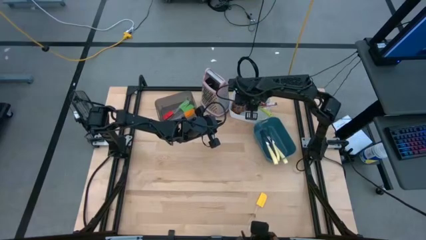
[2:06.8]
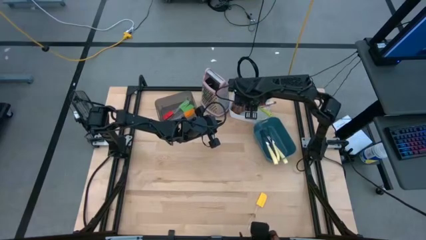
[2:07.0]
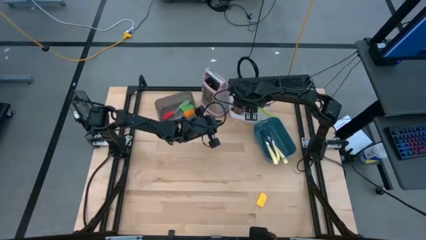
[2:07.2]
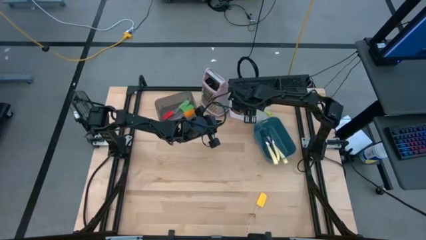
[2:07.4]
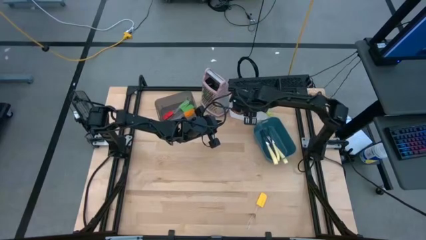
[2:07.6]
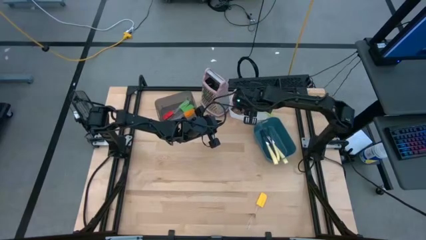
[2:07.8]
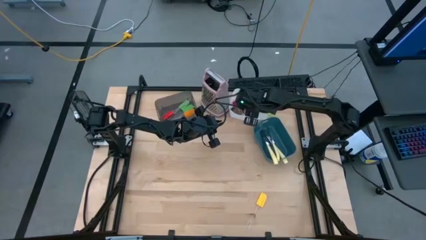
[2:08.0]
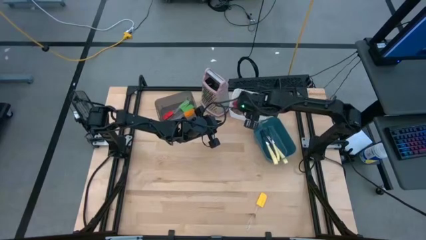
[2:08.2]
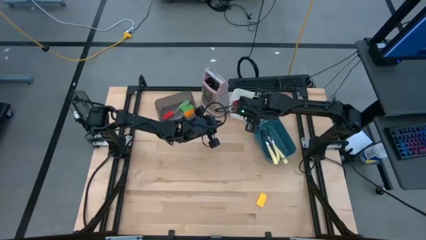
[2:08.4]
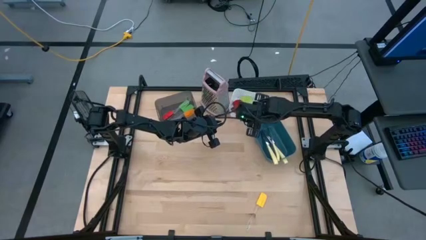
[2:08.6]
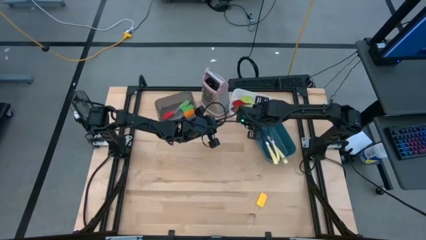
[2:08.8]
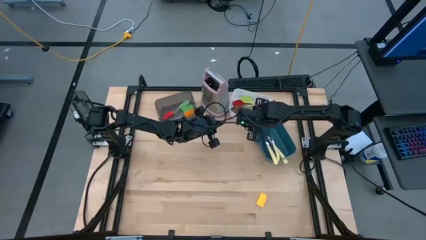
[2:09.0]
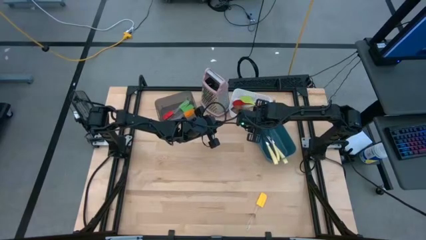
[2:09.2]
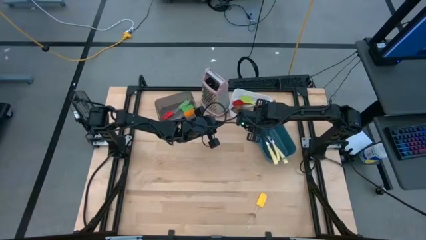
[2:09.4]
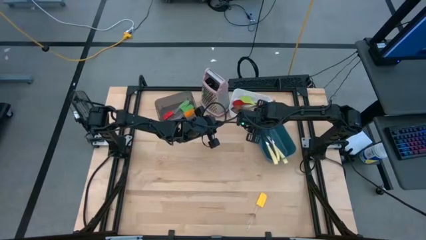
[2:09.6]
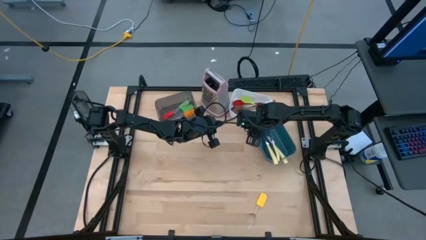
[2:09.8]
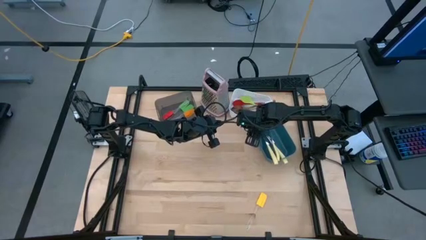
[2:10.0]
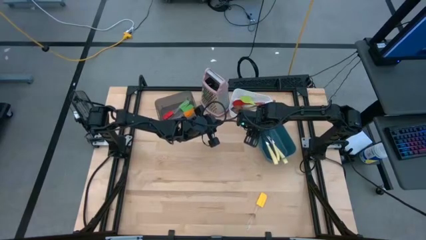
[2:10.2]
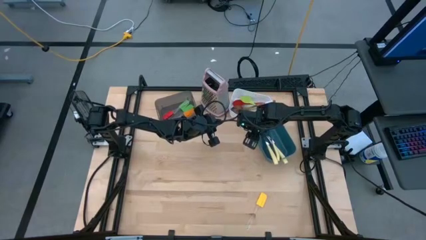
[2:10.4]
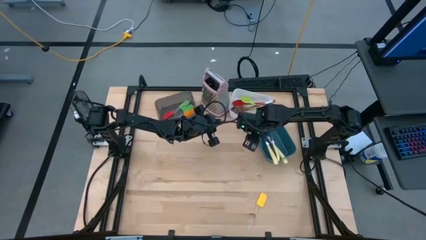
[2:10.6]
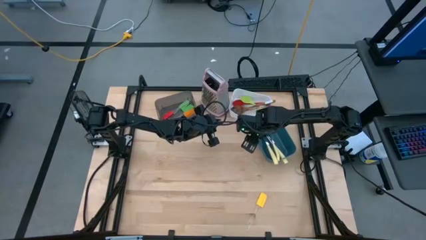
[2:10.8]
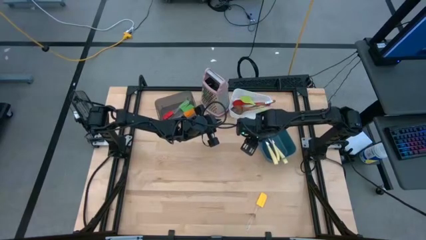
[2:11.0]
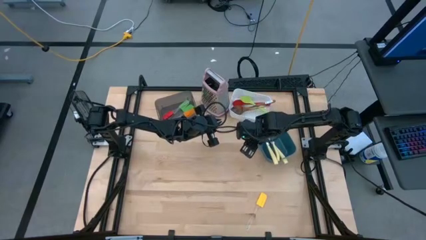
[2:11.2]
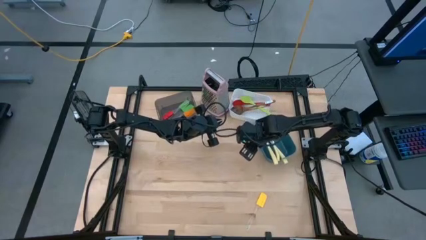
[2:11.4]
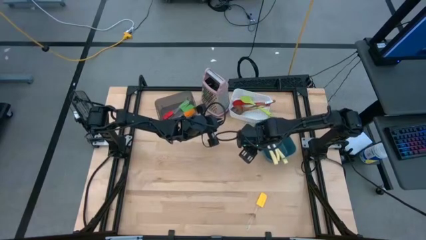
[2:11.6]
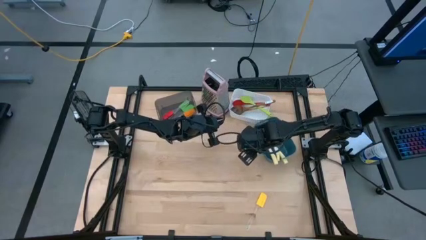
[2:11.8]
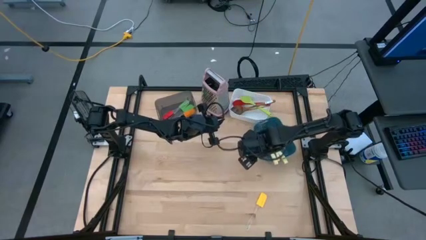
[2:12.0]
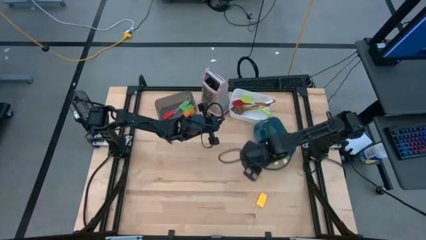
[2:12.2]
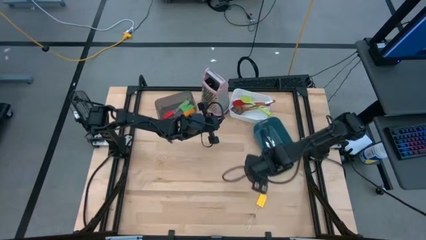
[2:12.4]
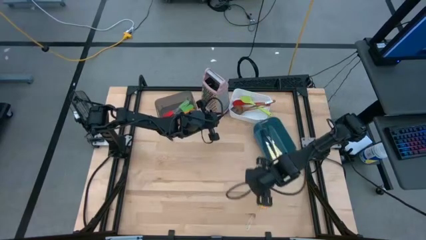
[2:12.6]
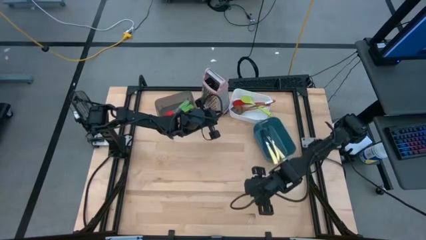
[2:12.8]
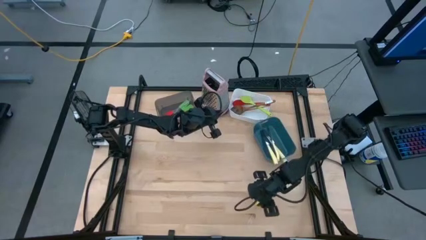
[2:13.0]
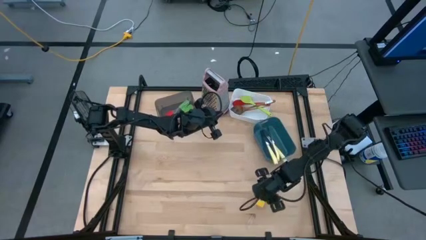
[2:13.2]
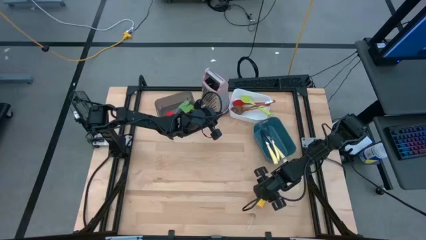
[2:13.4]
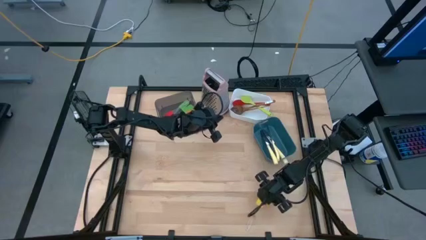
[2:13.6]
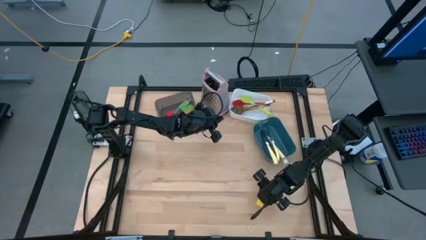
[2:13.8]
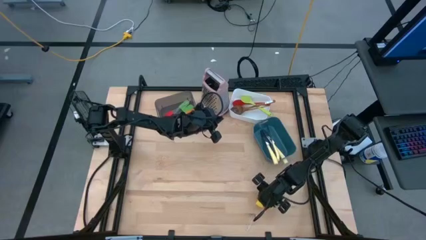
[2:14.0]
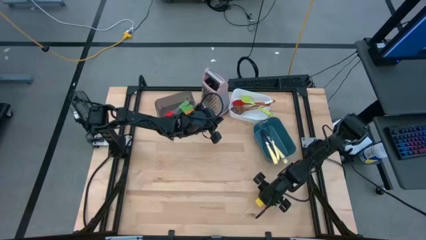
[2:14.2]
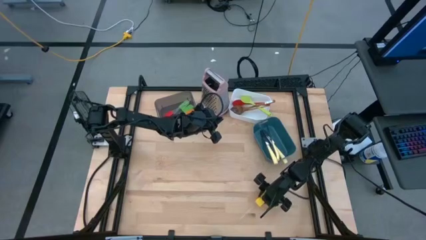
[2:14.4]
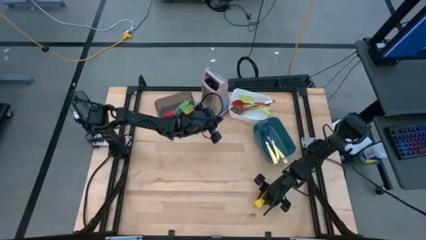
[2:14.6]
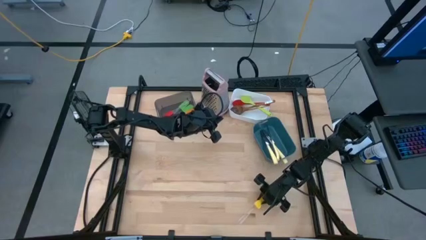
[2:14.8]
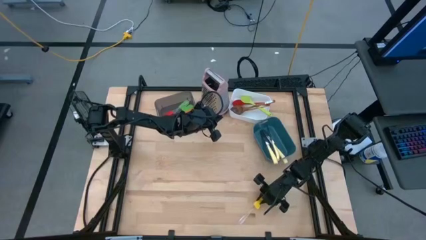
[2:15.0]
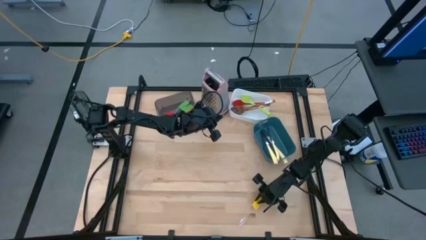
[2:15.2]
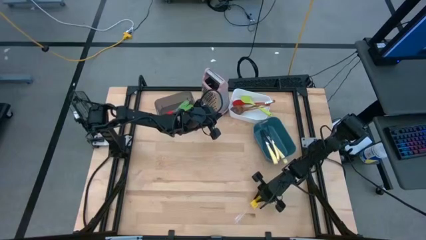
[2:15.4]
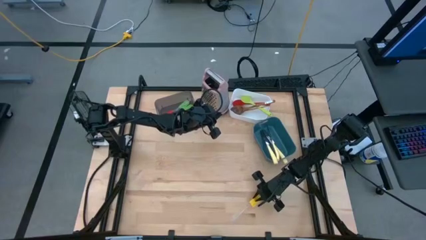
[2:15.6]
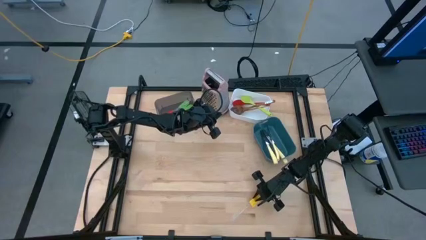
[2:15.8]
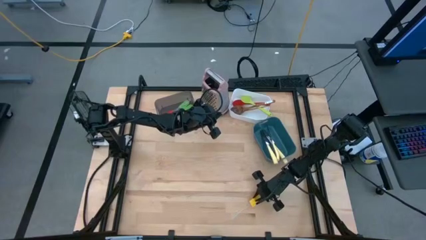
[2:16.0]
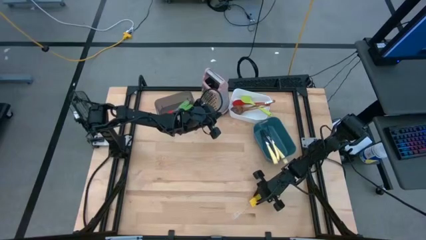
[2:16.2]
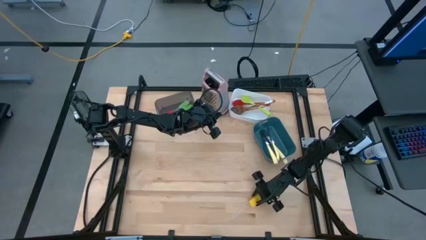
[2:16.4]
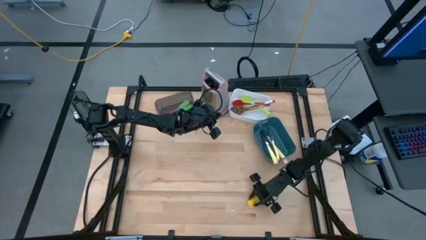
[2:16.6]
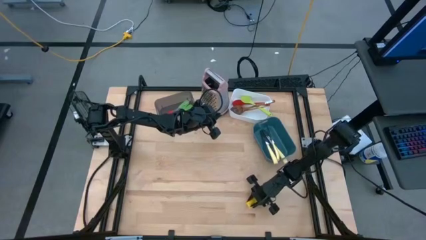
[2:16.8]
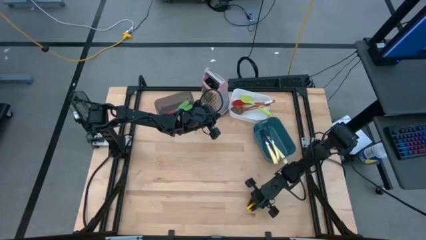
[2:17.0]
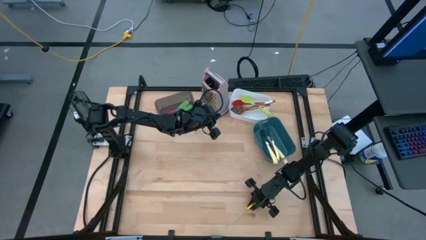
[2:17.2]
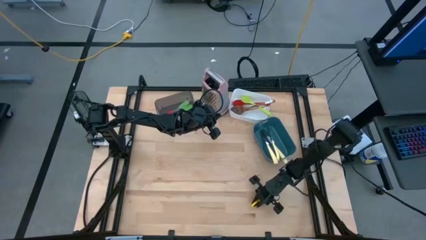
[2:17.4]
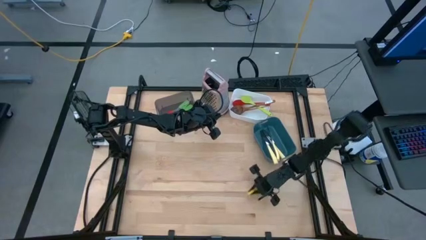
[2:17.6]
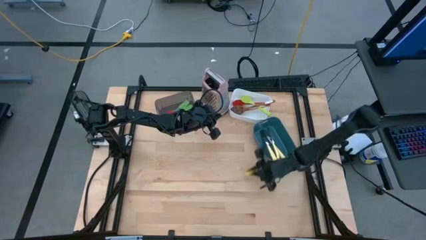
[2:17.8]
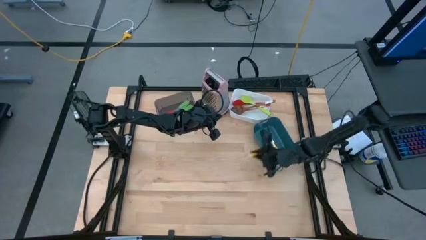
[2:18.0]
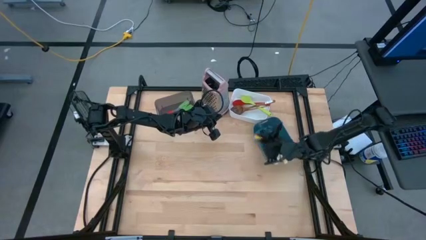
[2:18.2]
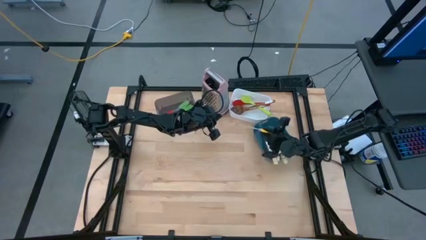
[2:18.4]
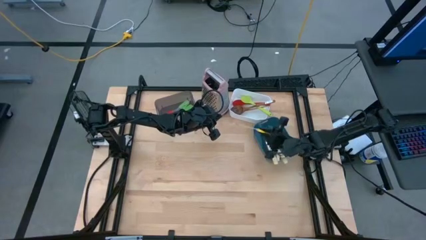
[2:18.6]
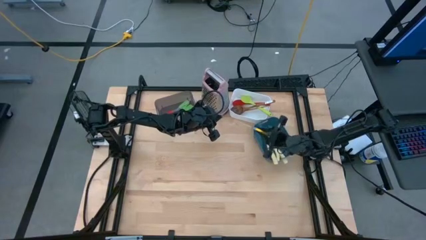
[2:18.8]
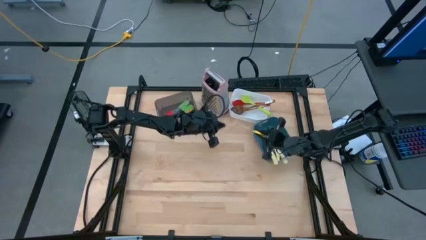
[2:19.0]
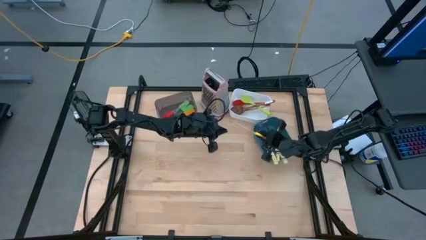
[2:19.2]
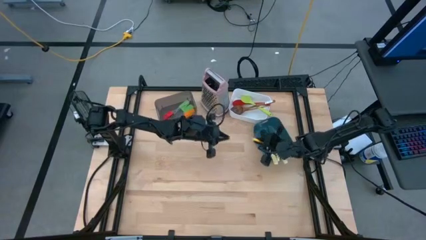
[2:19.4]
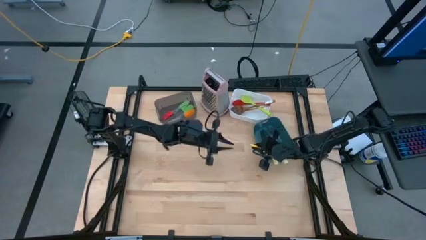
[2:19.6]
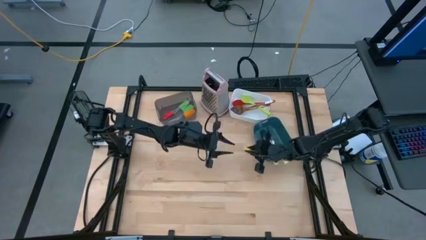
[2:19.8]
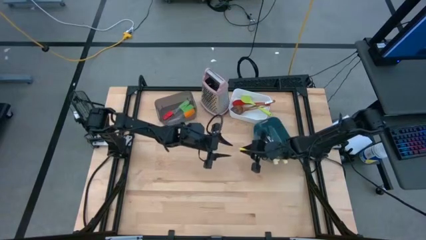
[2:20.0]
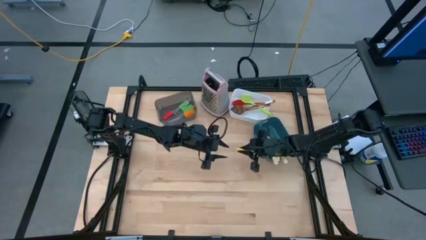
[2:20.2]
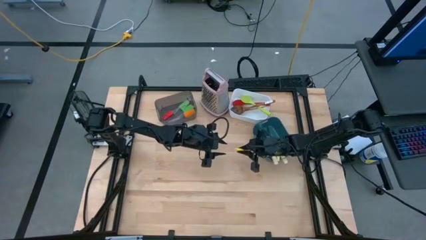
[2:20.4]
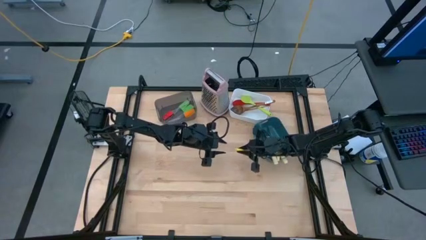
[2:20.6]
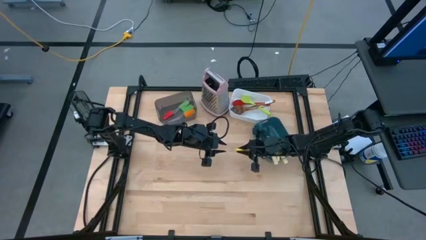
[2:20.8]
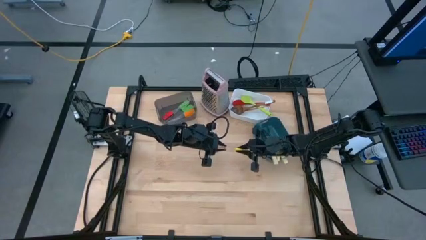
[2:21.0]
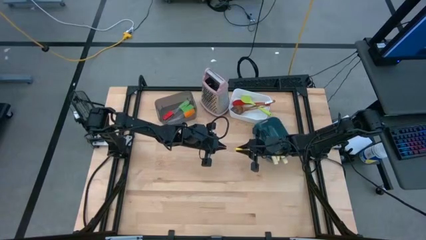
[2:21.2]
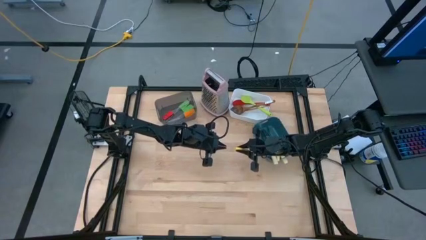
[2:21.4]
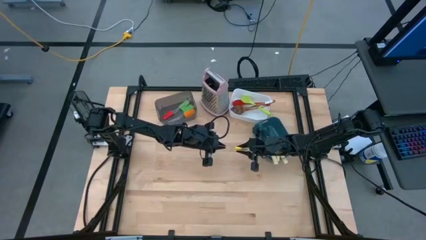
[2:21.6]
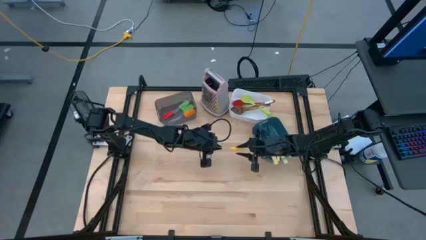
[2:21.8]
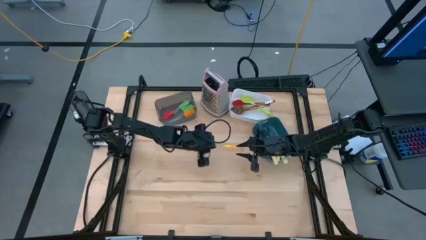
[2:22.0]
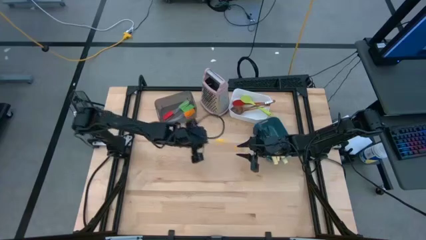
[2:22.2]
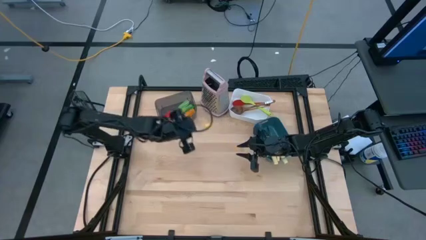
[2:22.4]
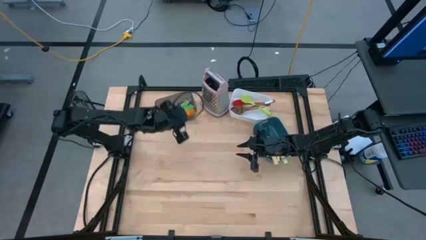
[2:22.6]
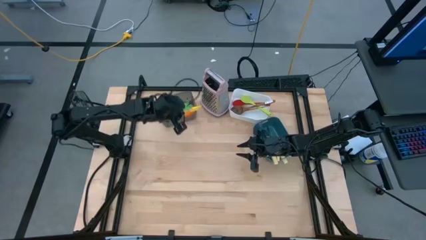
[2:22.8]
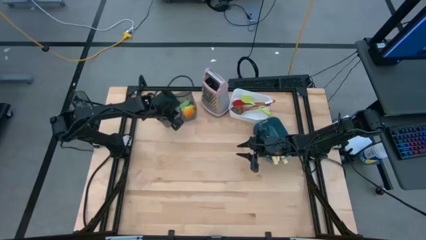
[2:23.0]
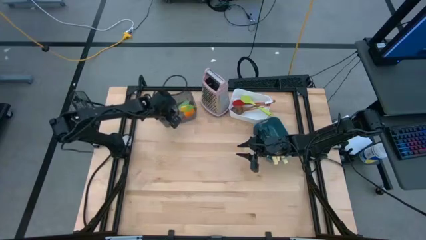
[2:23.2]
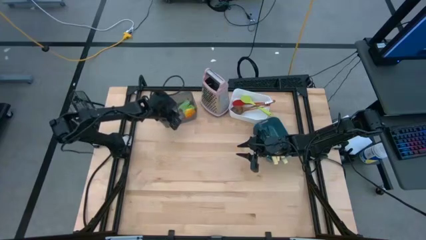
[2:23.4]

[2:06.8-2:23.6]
Task: Pick & Place Kitchen Items
Put the yellow spatula into the black bin
